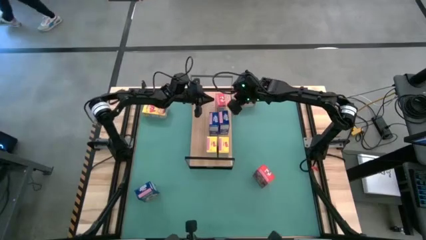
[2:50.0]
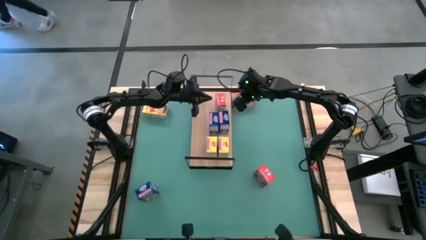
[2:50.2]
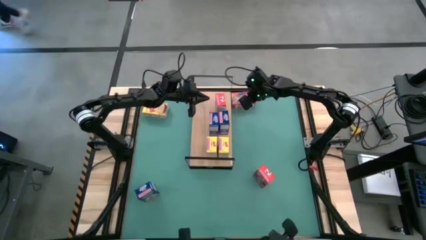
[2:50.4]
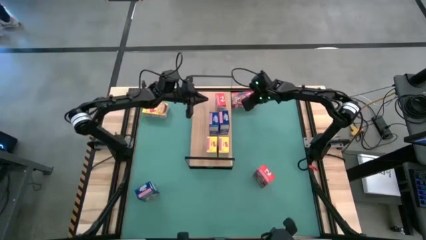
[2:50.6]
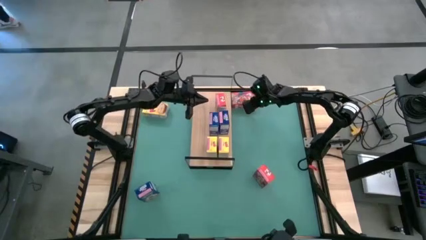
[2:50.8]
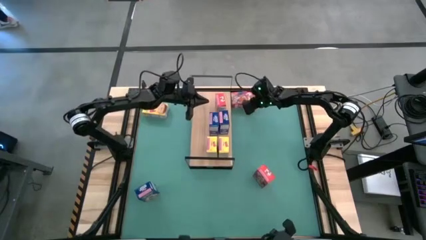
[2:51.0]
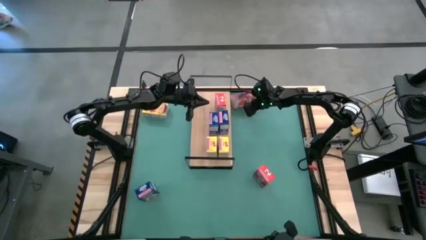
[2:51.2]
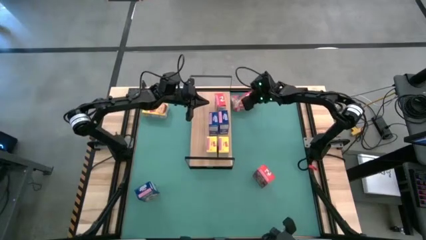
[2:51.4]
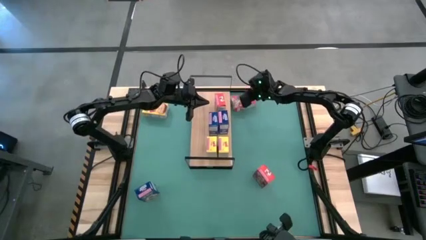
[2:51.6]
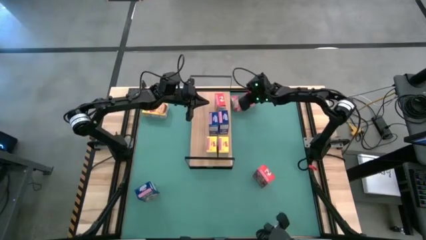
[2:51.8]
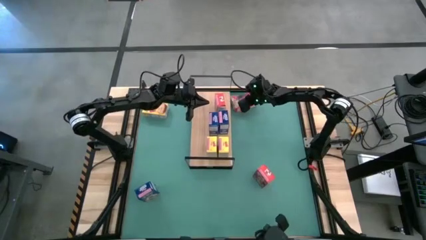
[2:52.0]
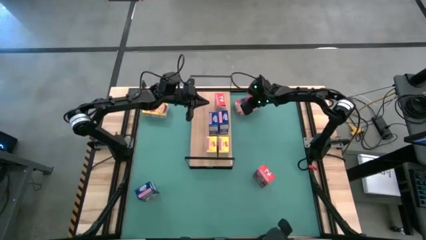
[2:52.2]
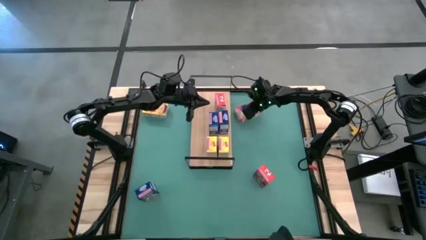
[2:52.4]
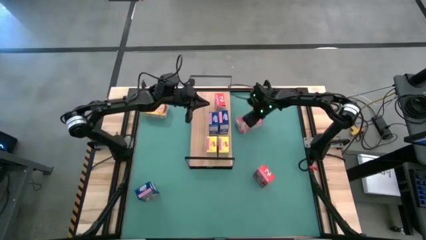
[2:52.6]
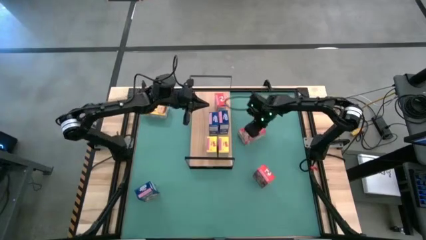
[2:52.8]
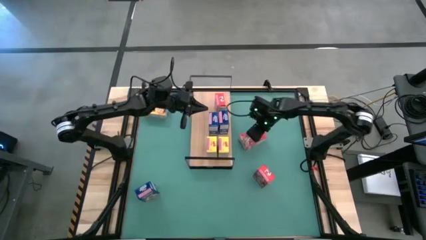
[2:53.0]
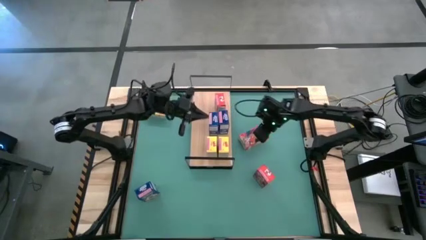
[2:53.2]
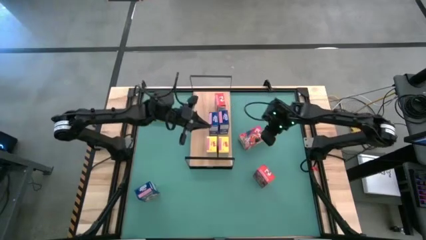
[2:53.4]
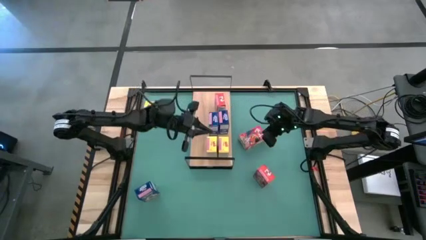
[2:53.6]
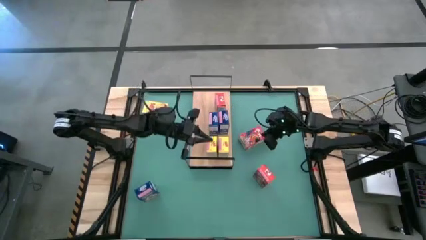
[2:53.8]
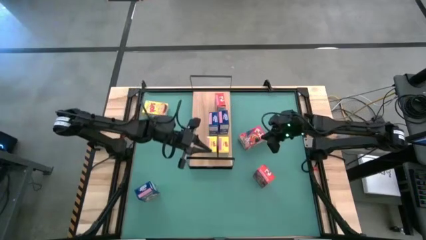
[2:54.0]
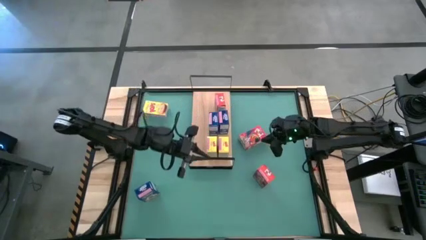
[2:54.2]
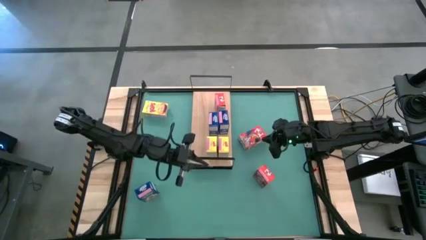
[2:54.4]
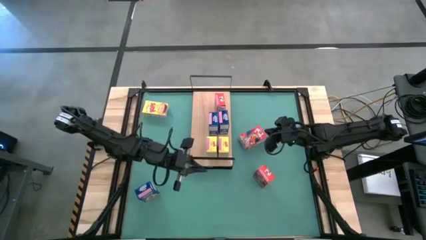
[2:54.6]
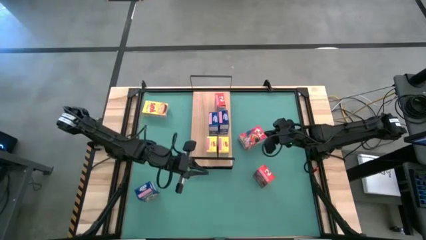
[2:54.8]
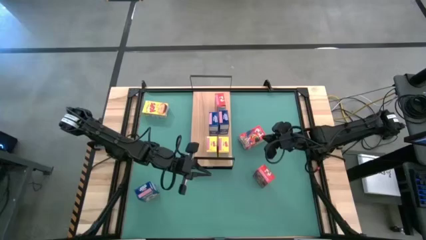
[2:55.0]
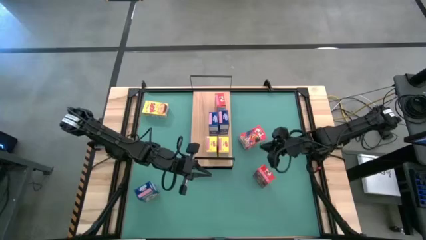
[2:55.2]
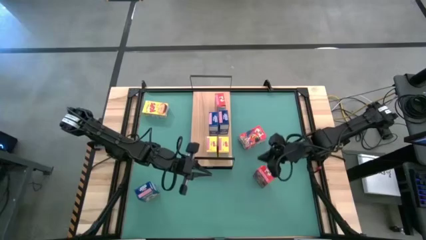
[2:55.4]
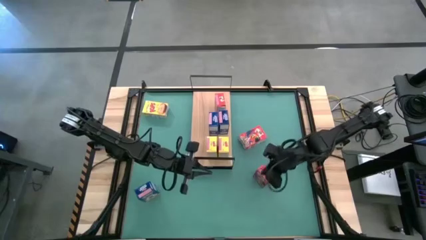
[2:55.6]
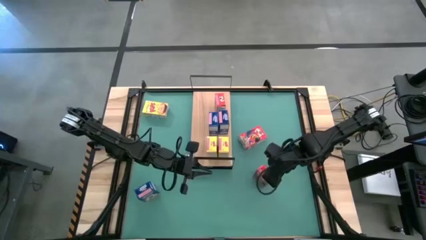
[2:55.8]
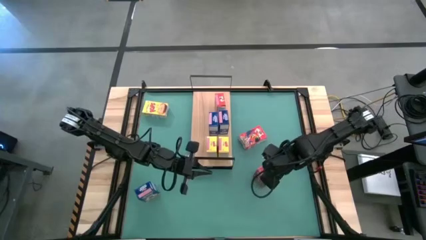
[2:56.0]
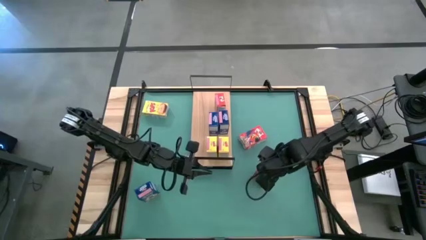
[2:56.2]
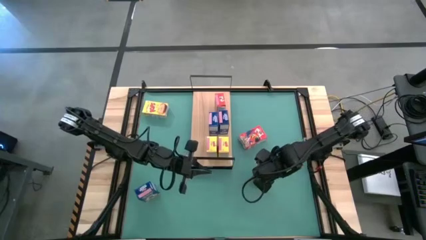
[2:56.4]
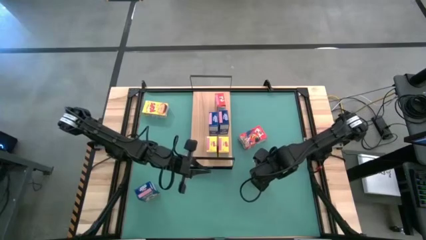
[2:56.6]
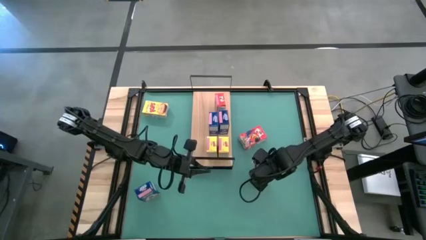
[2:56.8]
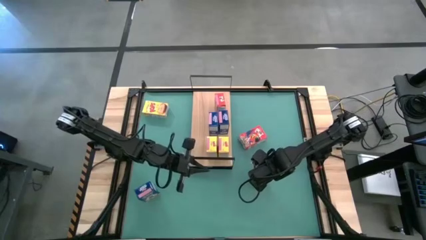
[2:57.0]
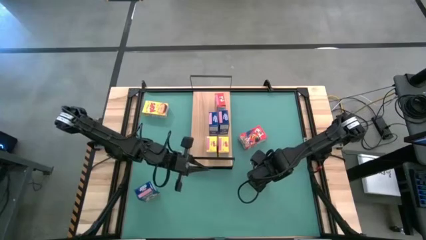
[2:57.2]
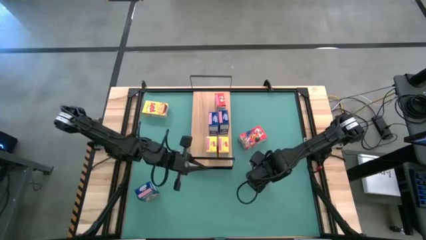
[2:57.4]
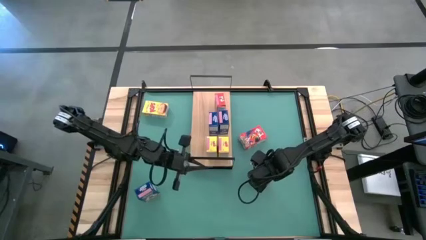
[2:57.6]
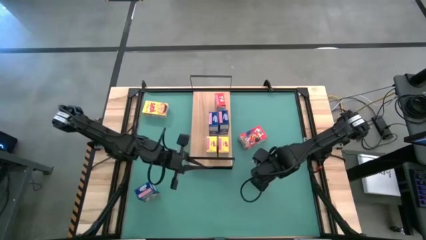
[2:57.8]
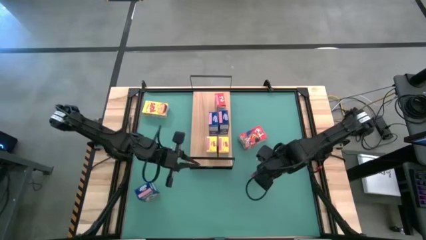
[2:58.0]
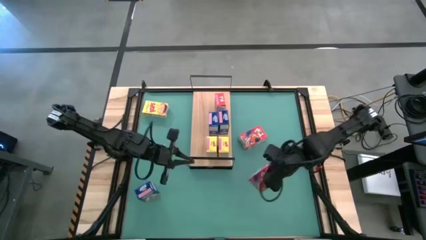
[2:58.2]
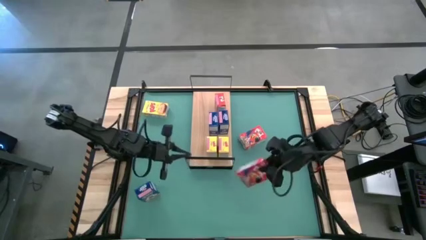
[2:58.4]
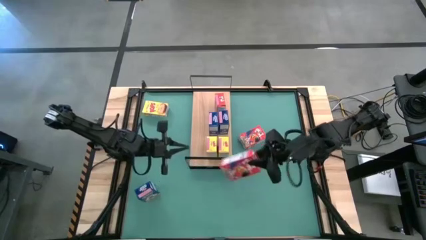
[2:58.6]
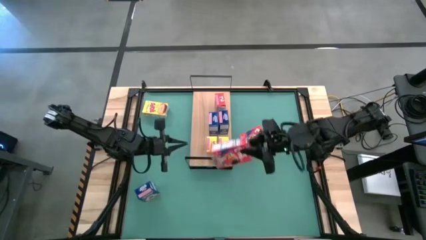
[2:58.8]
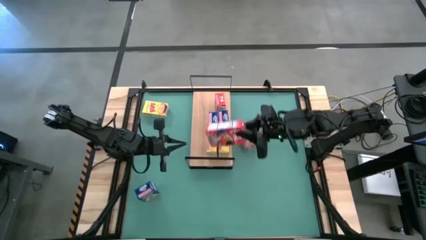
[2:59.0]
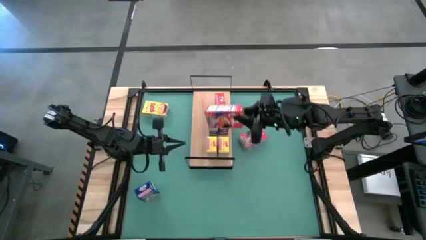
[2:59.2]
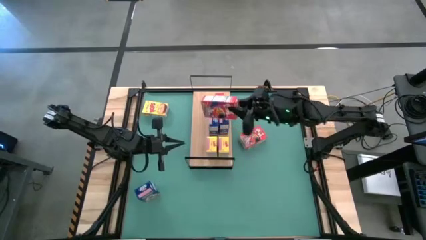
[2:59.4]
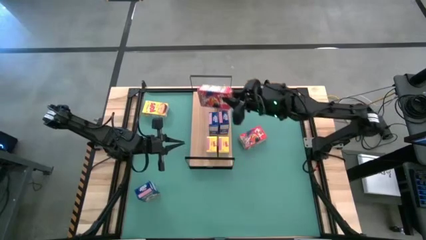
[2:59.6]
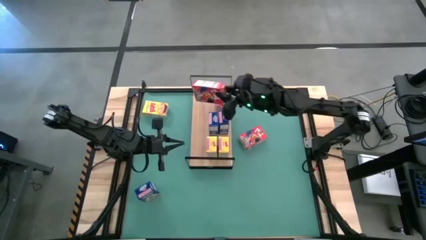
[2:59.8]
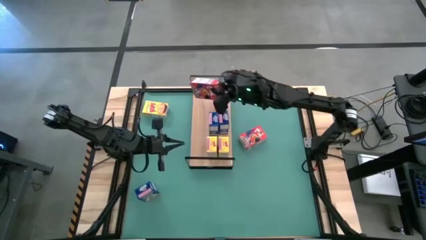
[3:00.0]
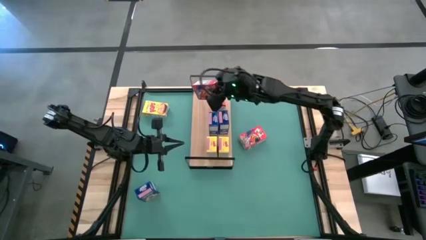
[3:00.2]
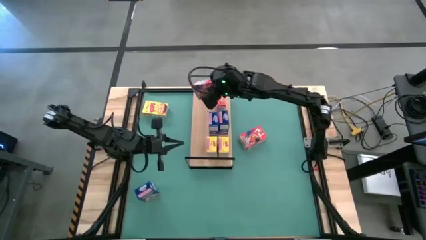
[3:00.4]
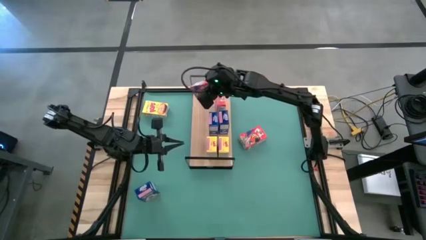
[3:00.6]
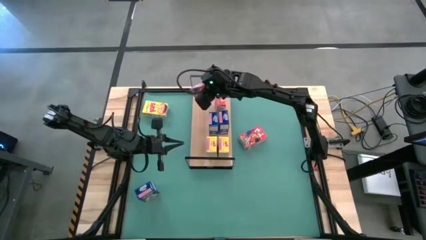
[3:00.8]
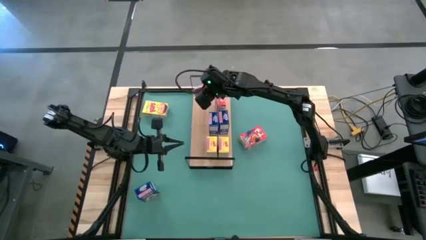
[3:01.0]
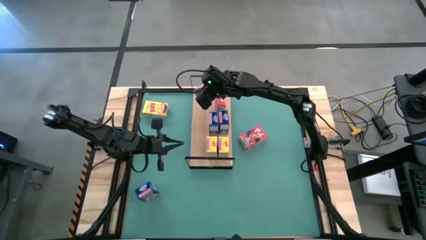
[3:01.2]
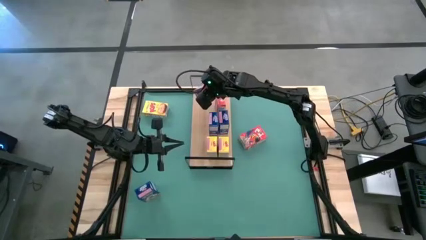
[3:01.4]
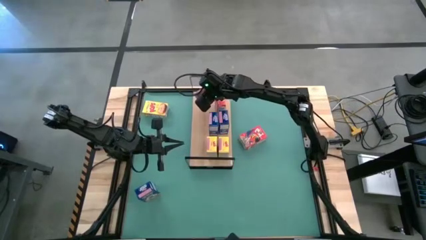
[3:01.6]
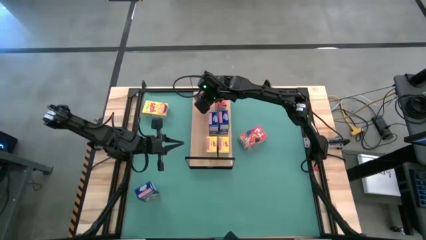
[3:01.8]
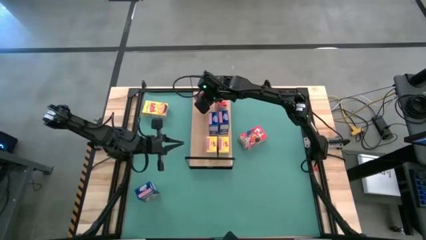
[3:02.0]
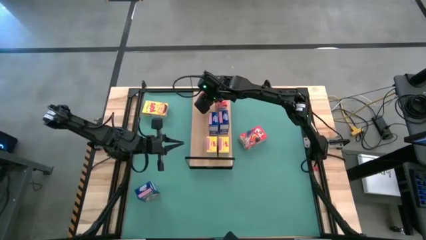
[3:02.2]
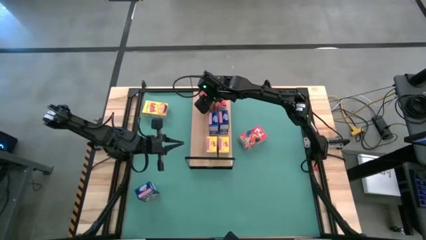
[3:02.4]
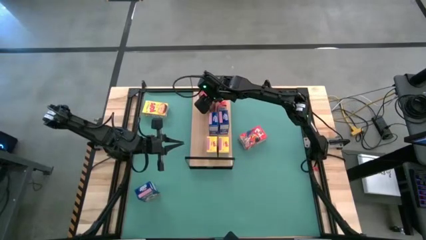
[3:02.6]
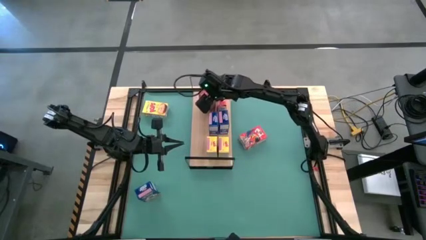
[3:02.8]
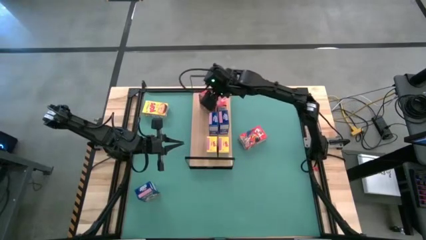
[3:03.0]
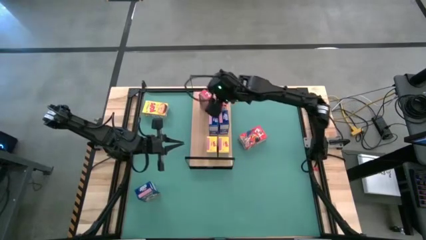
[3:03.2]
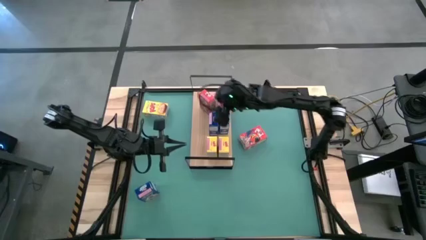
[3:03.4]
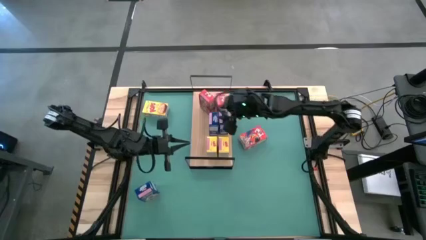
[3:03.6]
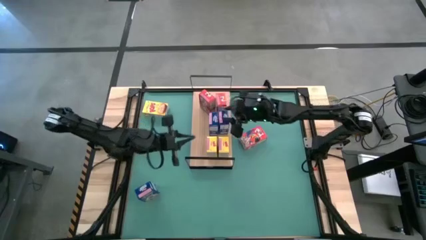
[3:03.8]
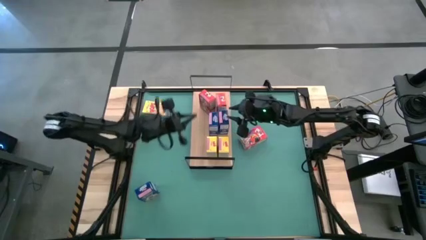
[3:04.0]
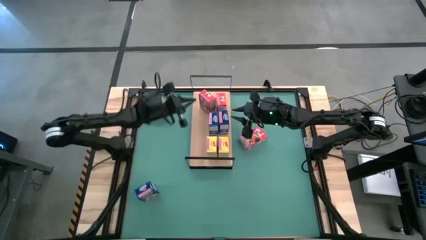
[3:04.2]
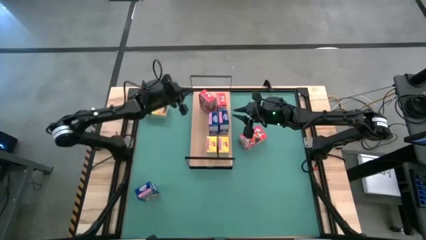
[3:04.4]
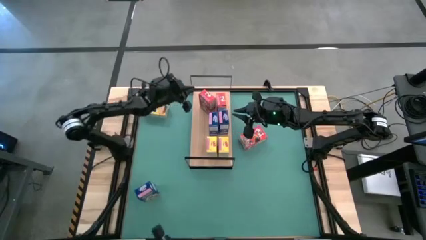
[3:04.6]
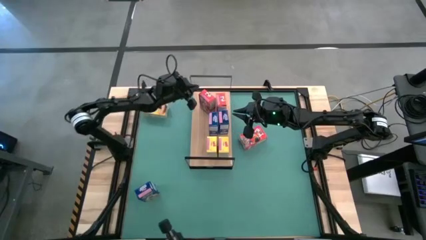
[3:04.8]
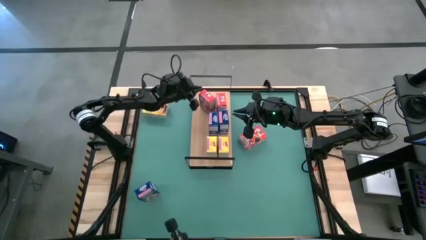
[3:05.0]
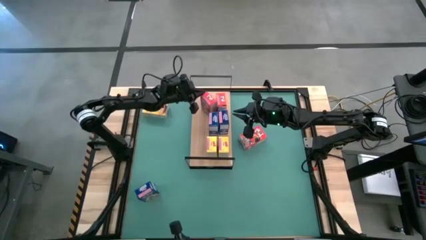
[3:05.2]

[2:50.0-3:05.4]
Task: Stack cereal on shelf
Put the top red cereal box on the shelf aligned with the other red cereal box

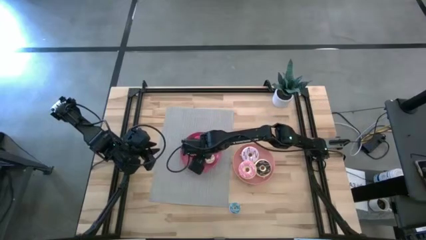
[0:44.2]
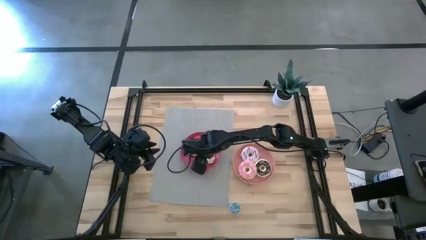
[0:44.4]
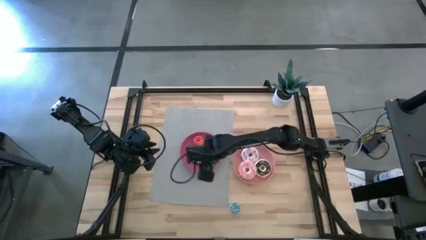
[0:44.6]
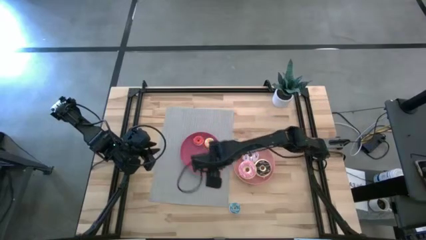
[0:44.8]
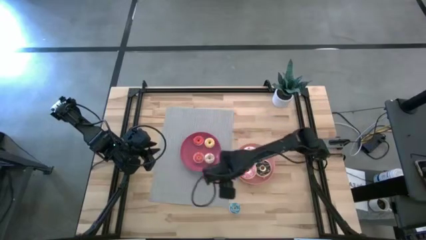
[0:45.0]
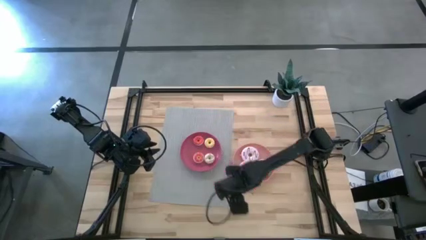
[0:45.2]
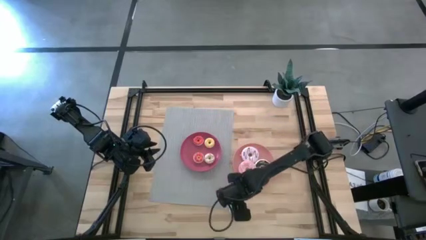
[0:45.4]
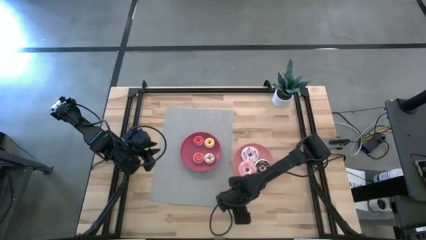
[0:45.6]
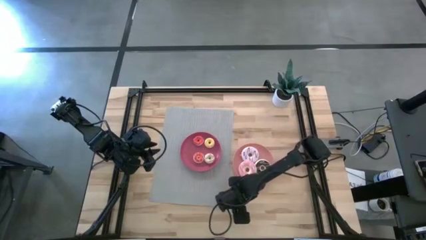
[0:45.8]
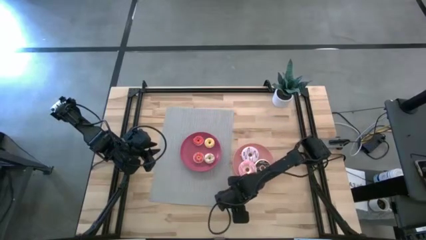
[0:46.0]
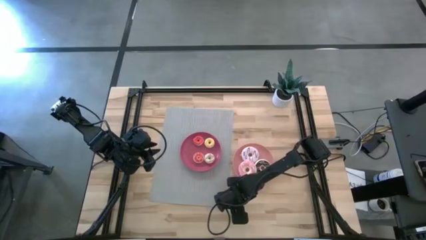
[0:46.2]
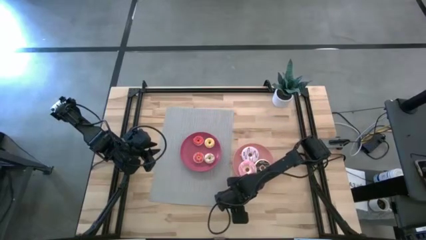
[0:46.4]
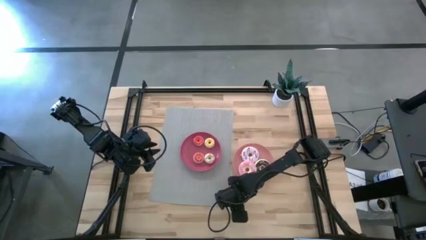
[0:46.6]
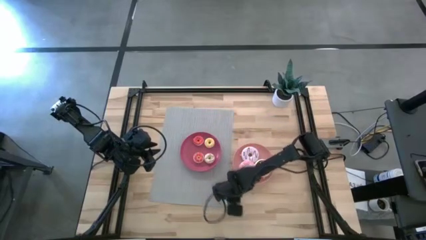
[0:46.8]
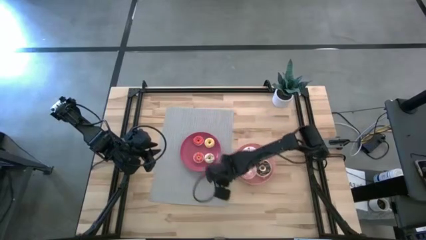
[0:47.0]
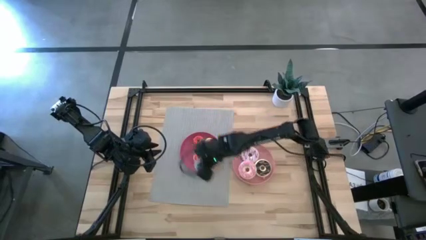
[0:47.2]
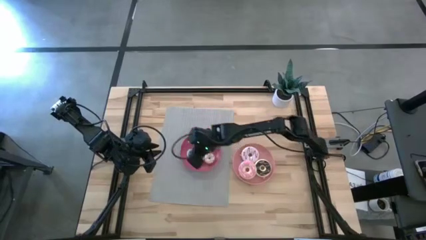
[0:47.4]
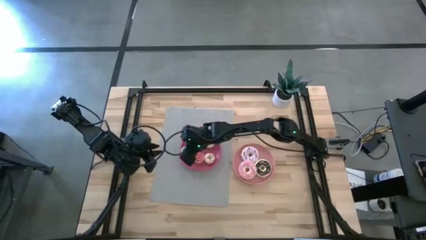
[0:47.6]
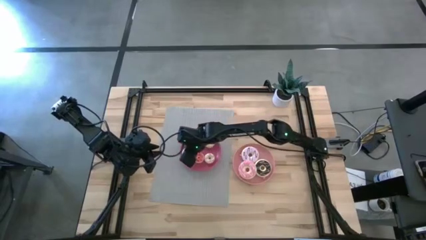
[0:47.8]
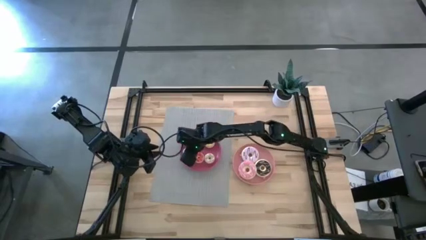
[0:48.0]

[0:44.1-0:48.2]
Task: Pick & Place donuts
Put the small blue donut into the pink plate
